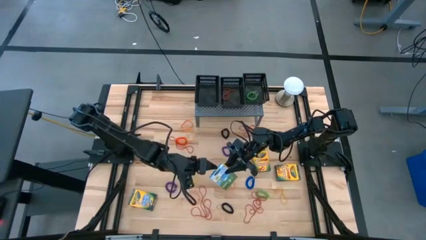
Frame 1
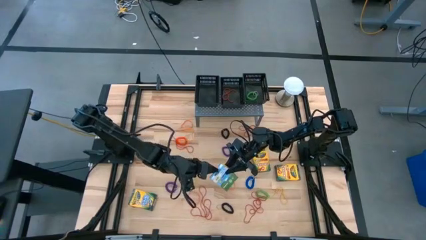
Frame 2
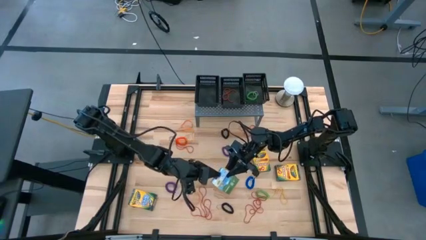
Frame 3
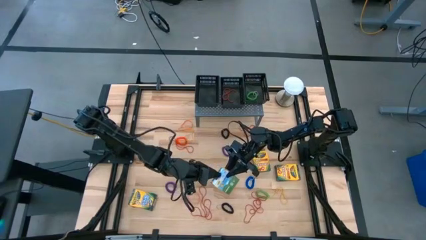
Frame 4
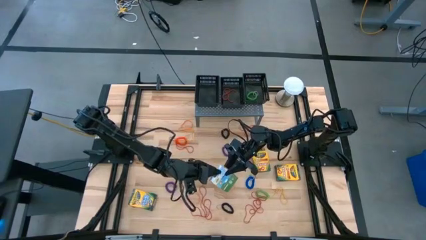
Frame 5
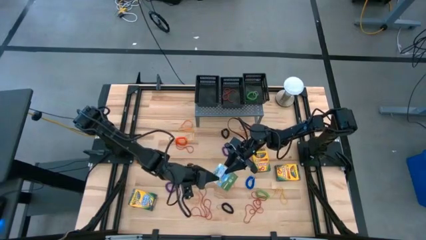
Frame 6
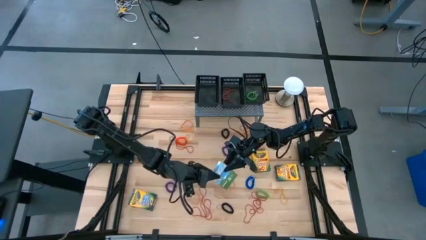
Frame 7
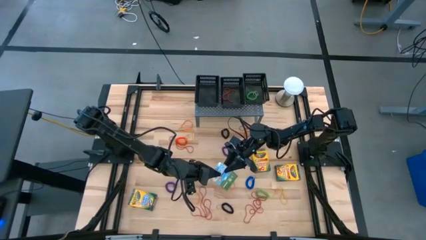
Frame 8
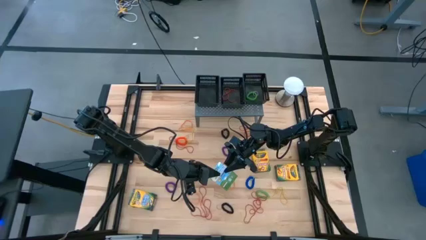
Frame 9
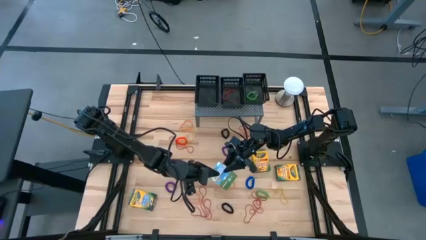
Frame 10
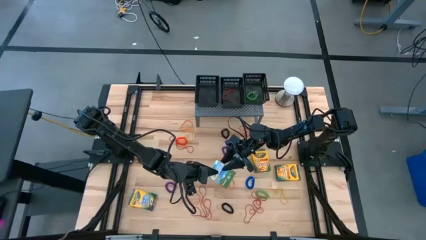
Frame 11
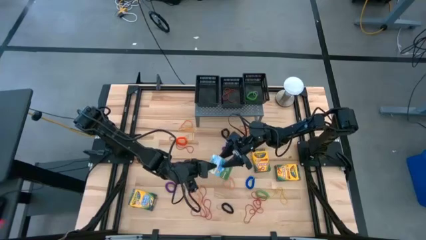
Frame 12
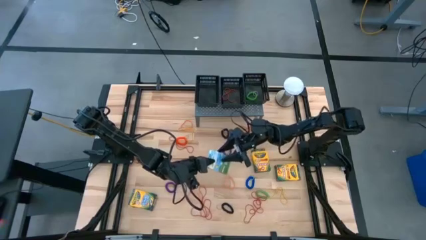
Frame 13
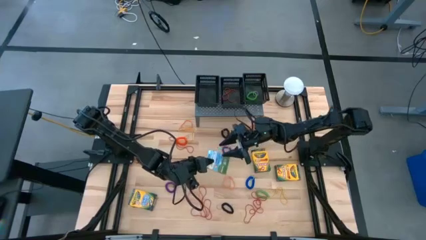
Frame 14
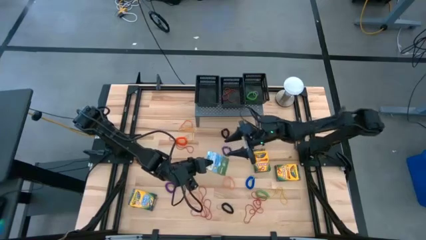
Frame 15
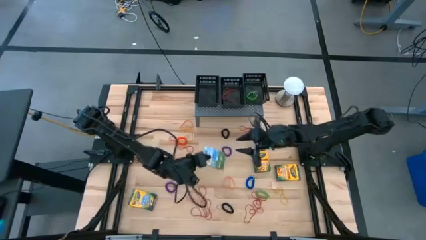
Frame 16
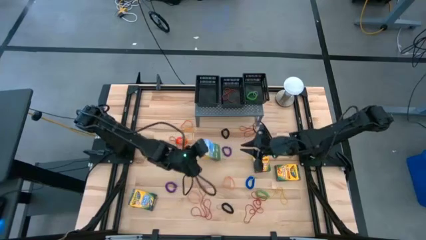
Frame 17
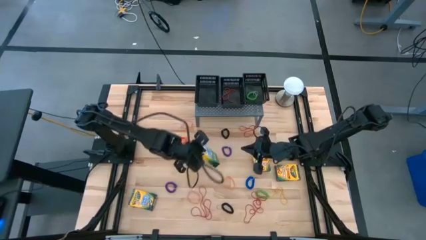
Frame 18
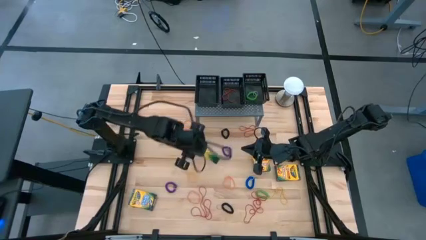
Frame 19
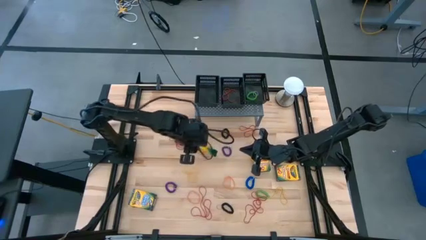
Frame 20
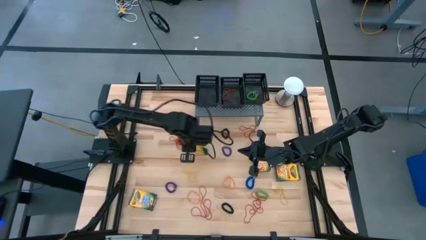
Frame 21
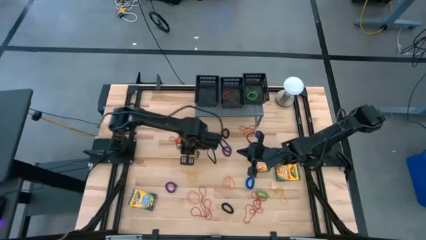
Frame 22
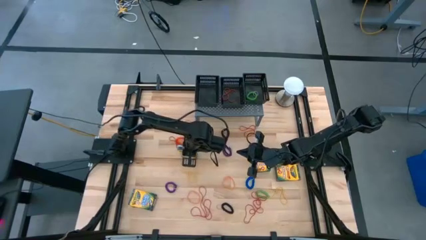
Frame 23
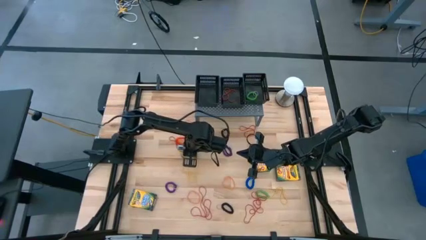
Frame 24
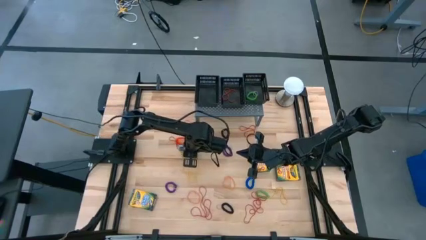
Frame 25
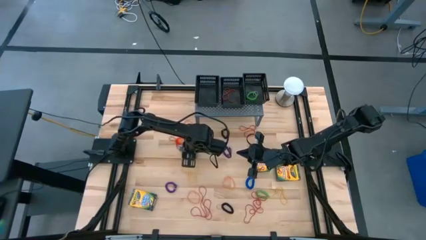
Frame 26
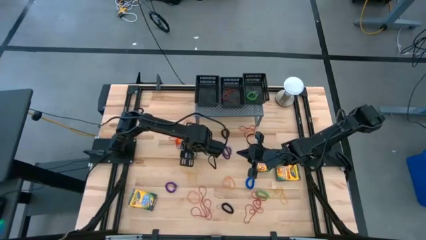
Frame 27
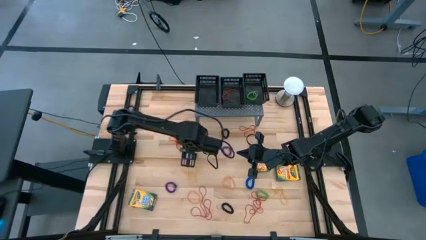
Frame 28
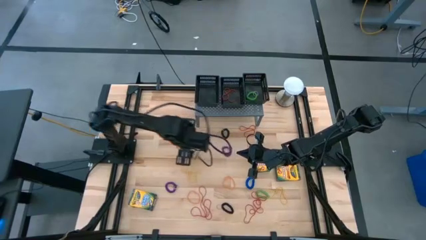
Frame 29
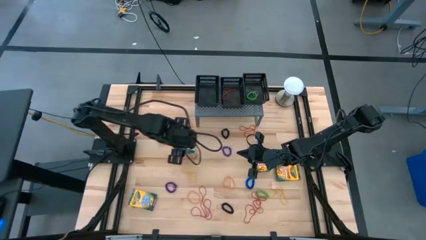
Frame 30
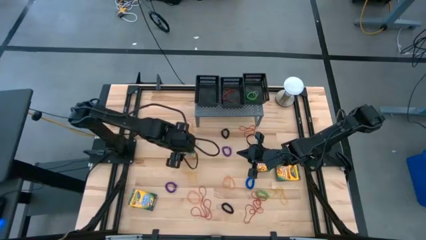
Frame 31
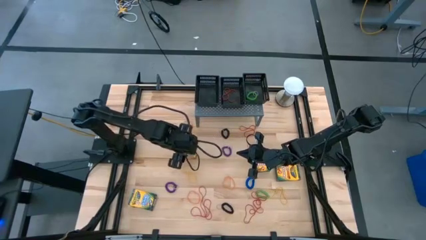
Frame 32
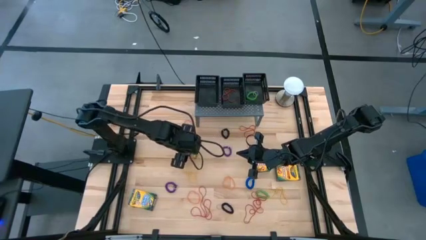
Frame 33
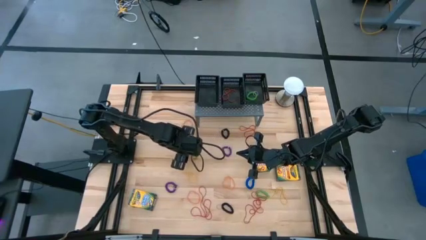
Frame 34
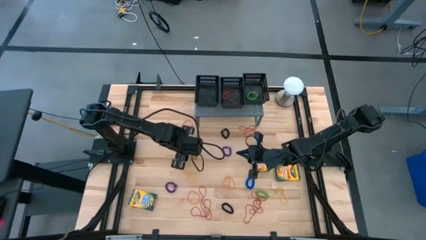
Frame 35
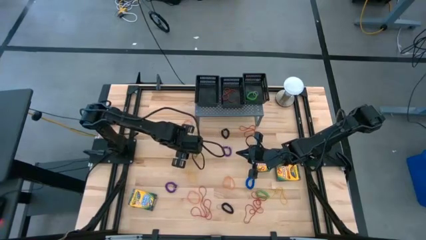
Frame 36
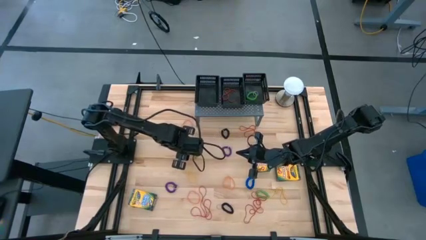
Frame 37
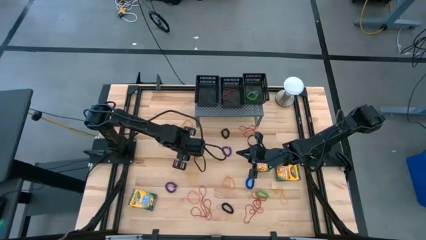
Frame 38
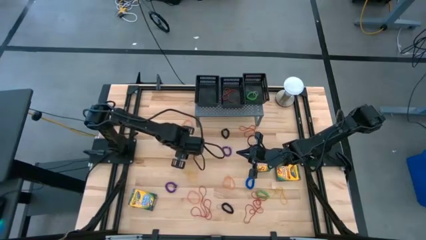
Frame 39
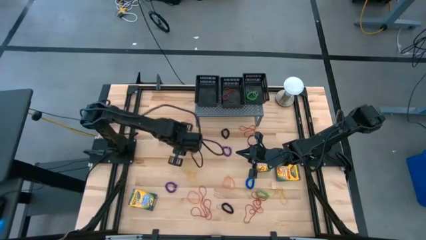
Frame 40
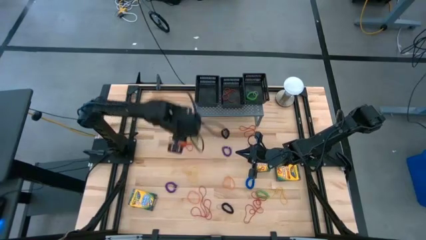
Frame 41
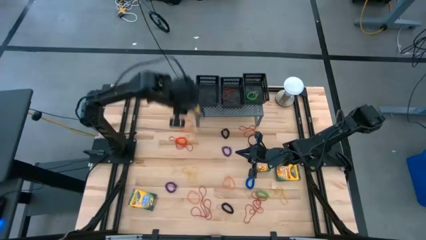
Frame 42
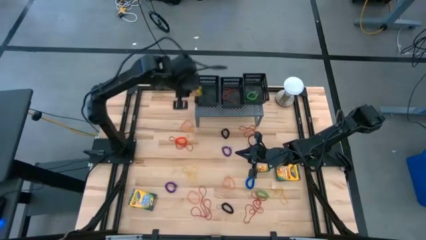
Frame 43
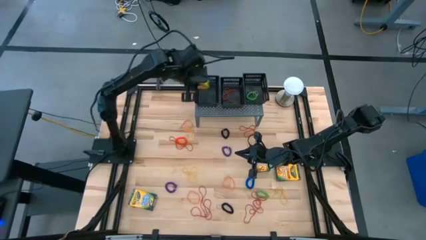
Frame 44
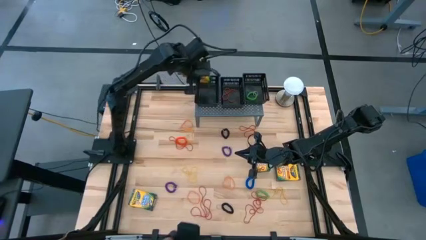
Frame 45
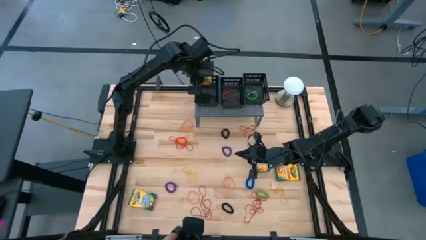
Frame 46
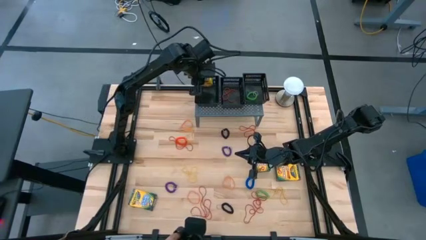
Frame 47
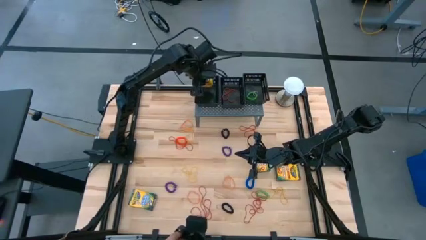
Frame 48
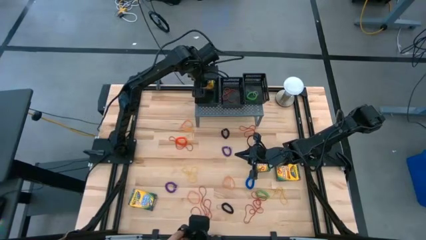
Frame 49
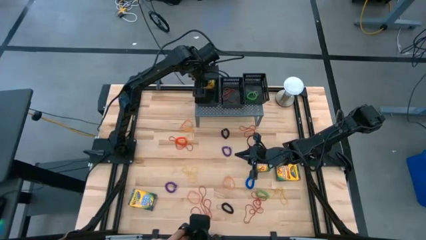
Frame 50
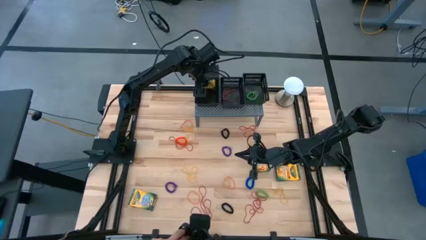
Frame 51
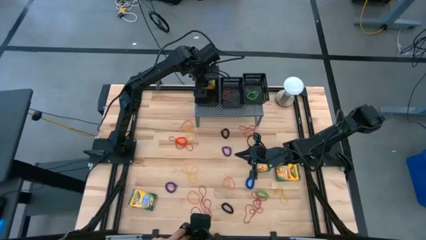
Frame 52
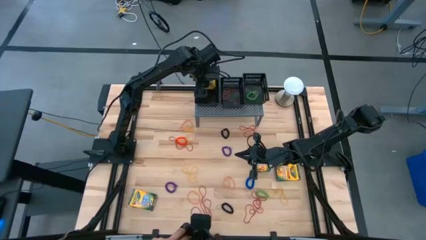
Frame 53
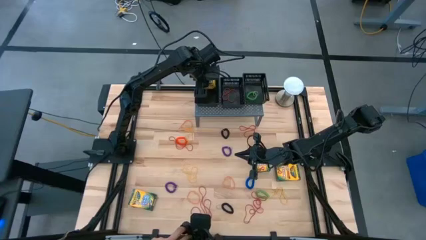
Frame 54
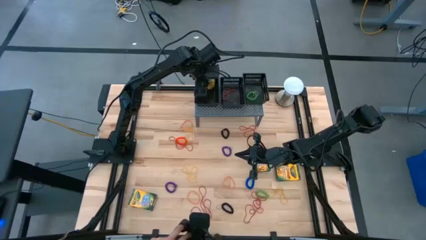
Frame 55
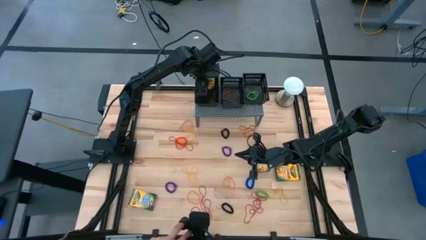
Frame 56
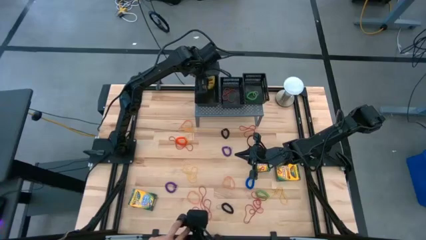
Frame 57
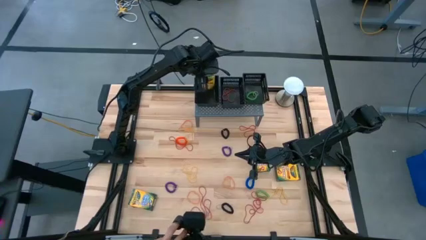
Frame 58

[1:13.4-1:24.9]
Task: Sort rubber bands into baskets
Put the crayon box into the left black basket on the shelf

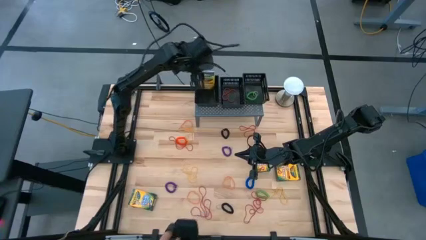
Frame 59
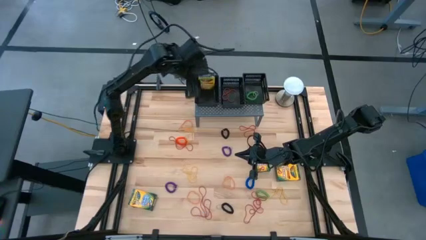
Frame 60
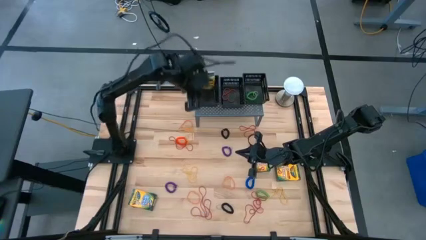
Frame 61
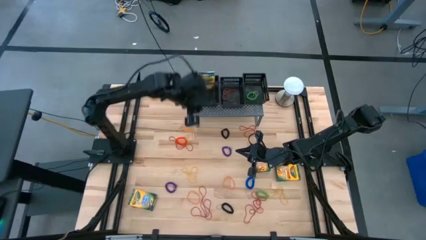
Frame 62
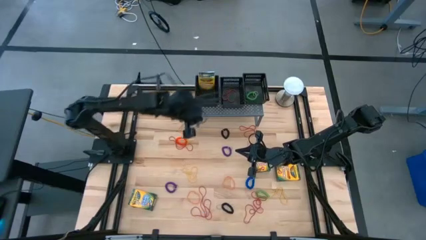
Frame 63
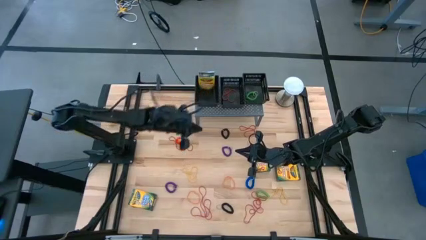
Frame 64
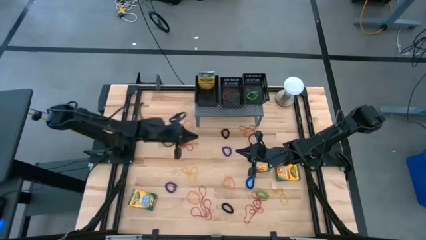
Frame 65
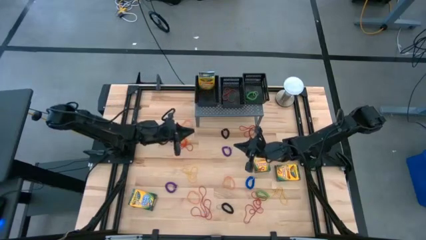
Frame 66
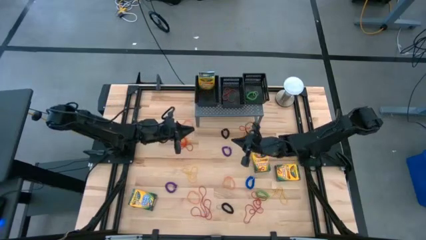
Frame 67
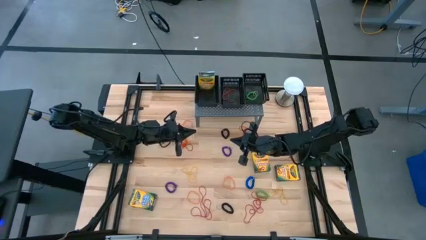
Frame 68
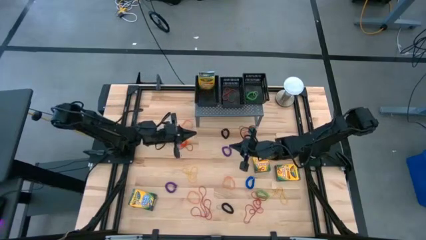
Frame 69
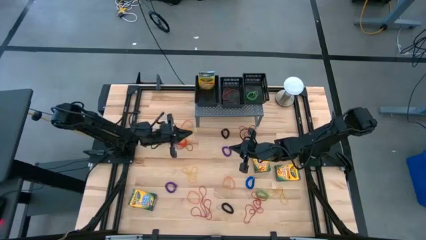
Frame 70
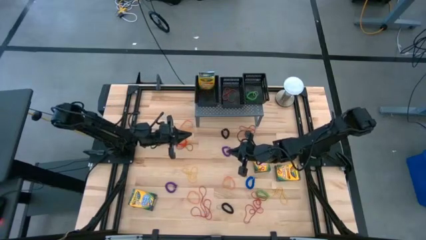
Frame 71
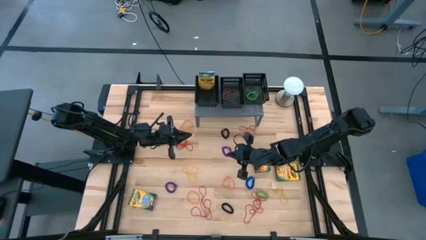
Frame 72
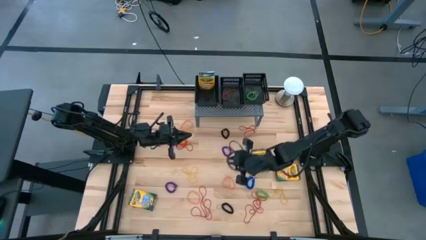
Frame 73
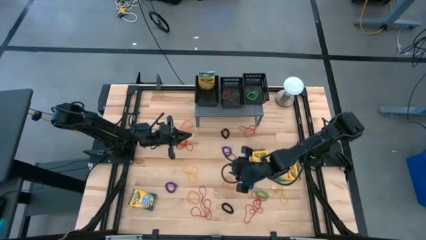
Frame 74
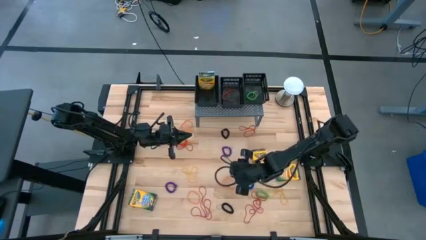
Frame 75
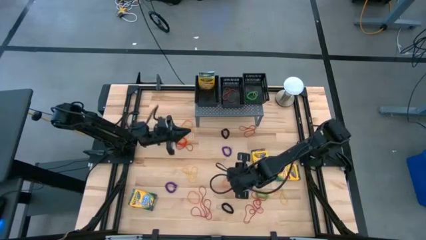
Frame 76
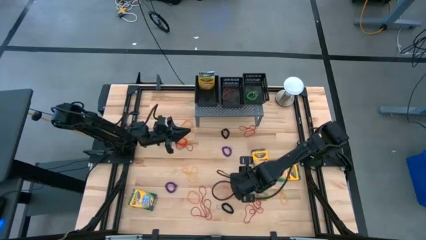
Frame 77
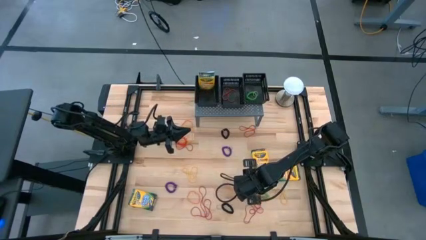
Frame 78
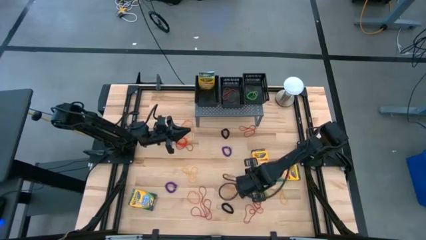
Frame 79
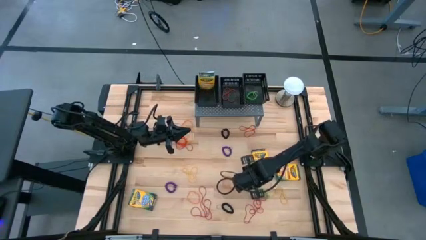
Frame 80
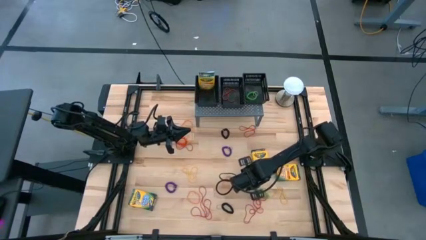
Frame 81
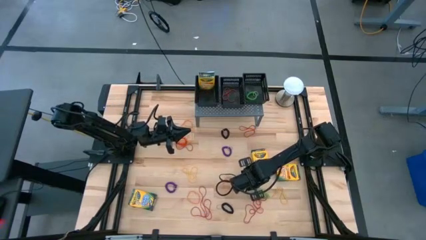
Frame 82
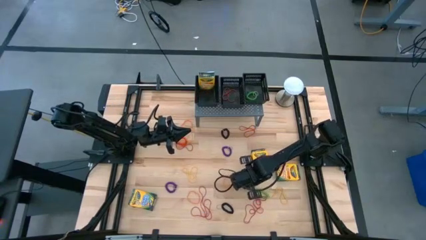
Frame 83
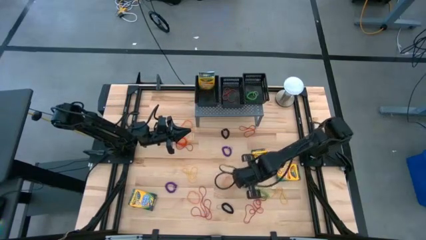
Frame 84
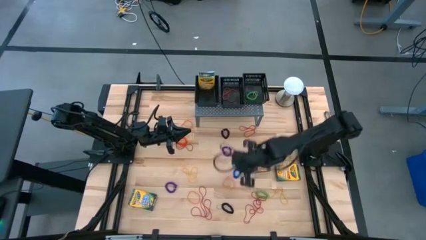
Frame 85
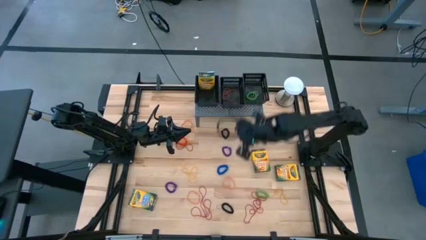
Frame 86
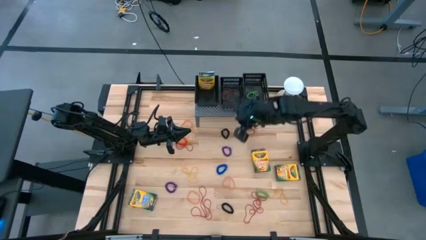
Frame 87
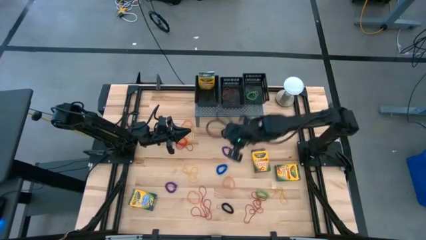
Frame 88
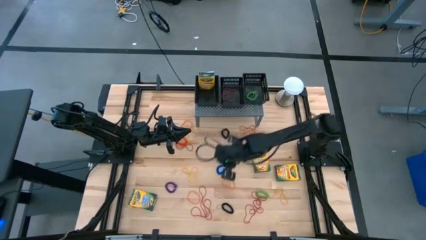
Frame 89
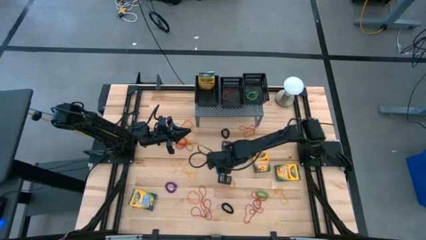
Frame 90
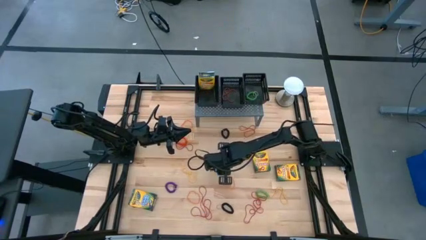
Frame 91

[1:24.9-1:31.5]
Put the blue spring rubberband into the right black basket on the shelf
